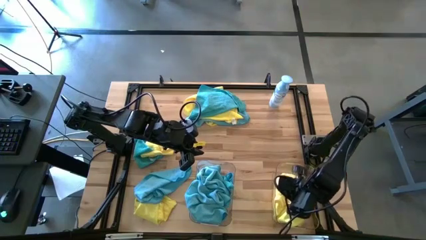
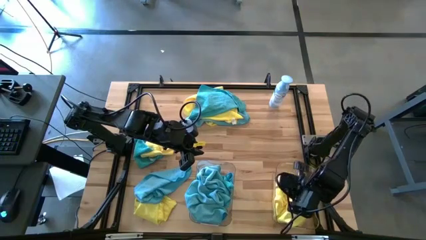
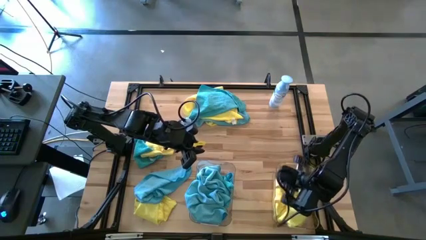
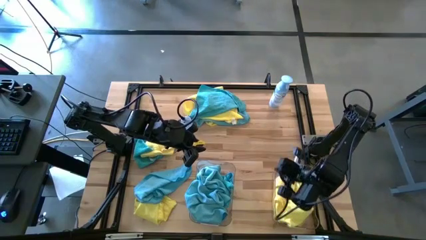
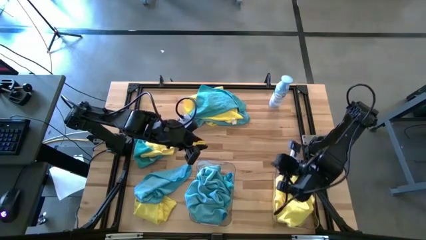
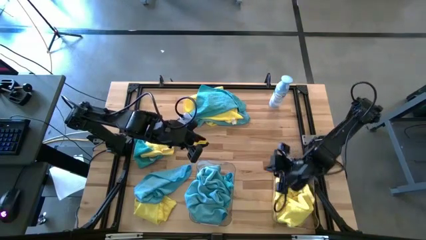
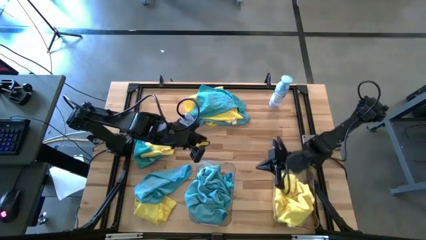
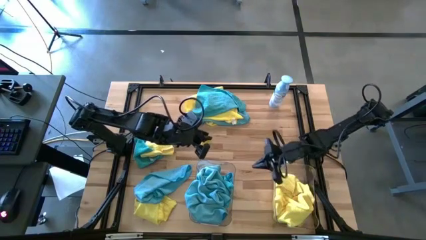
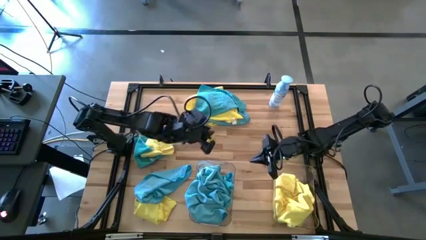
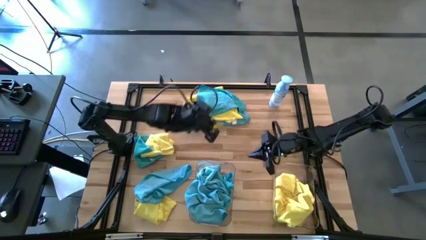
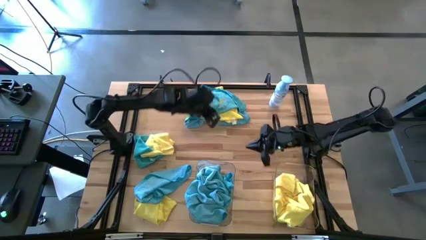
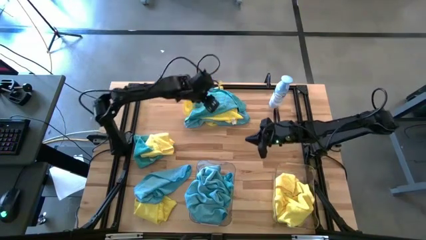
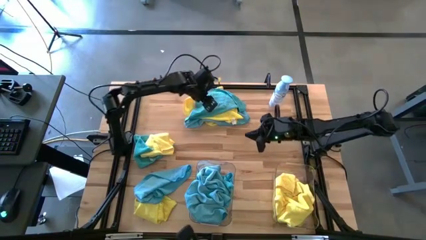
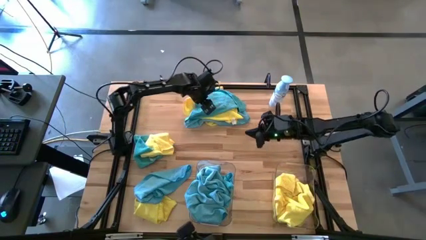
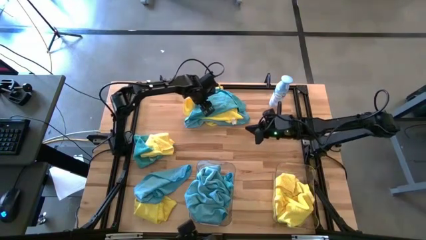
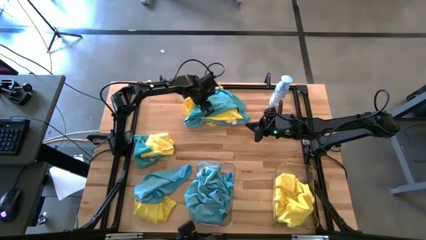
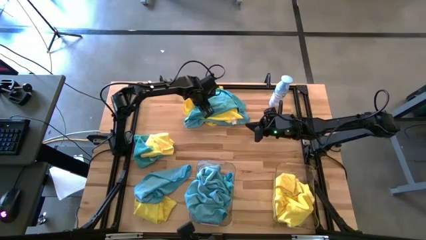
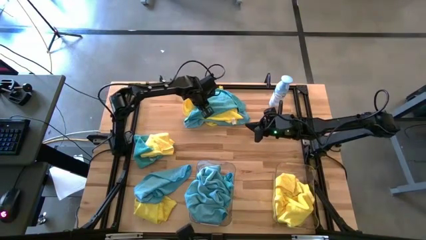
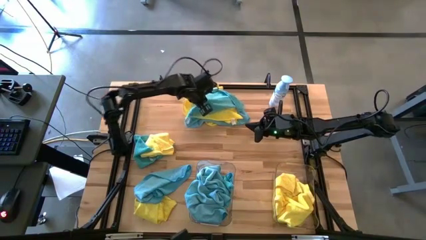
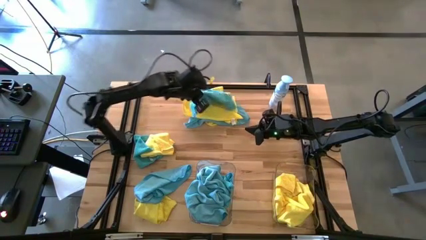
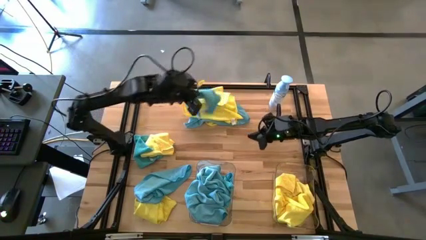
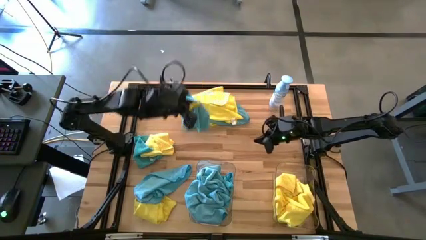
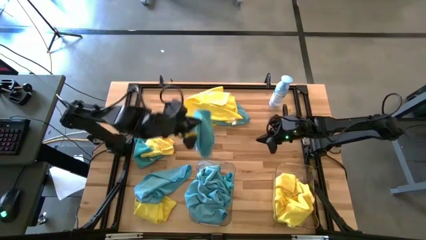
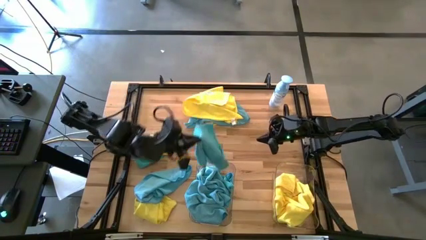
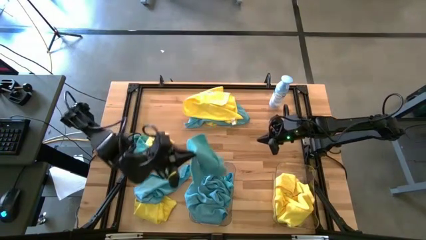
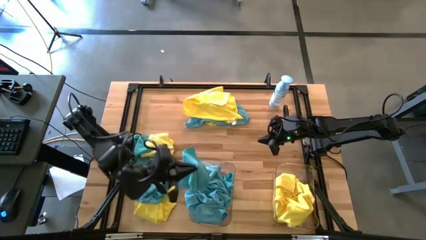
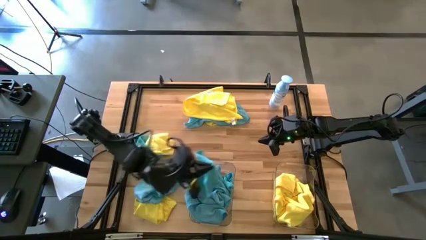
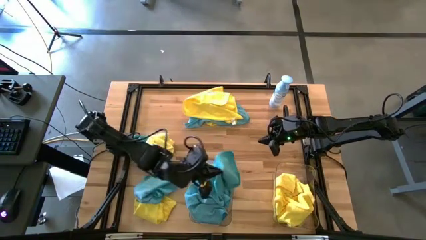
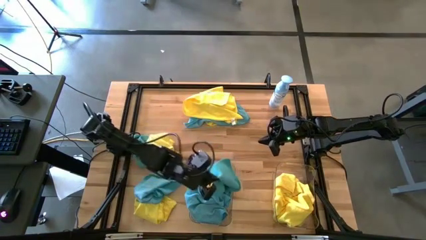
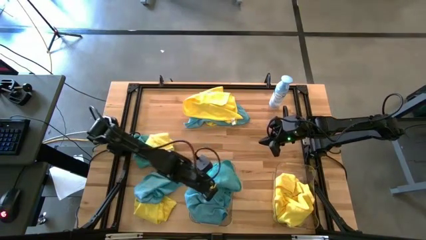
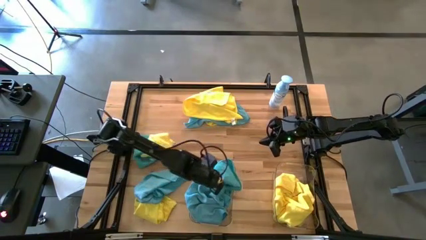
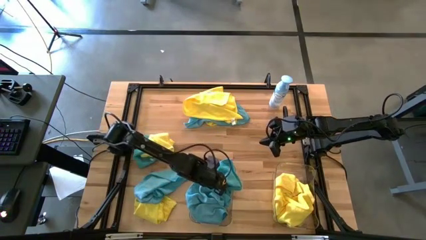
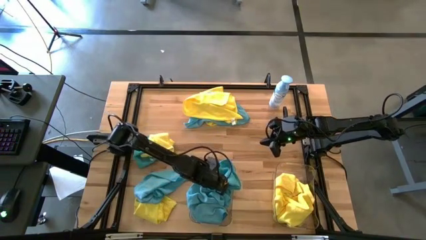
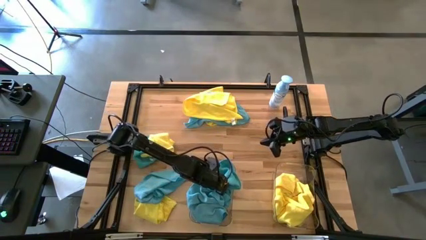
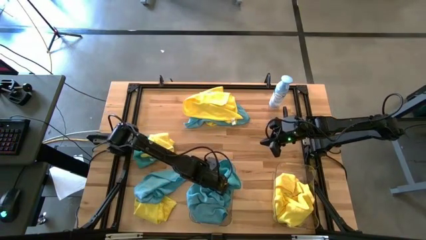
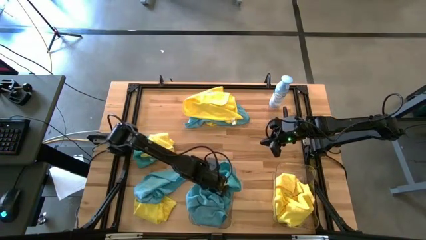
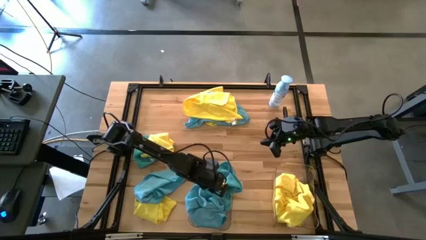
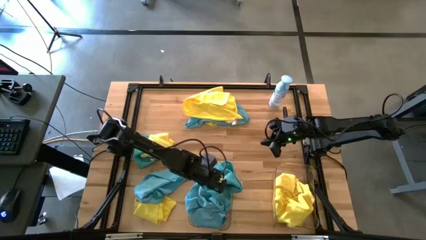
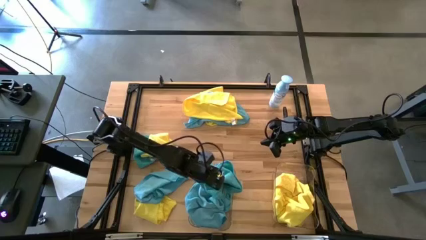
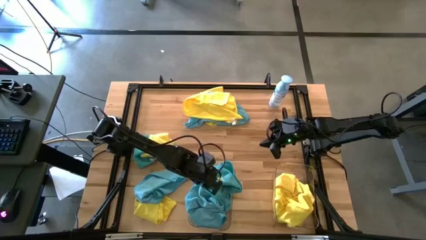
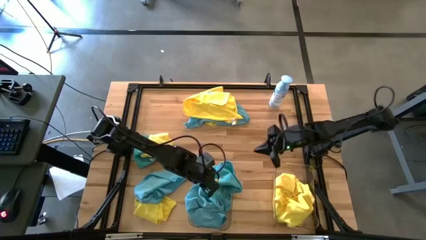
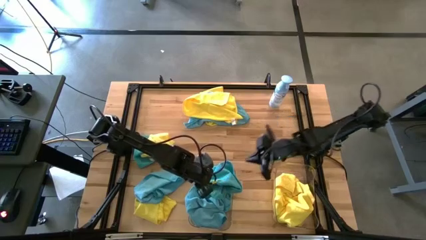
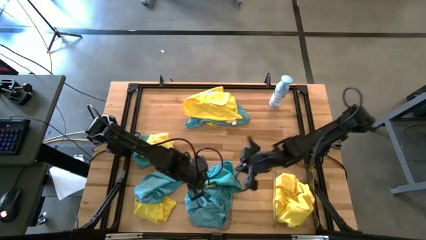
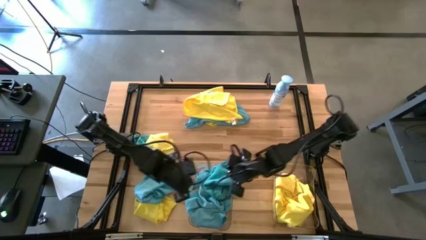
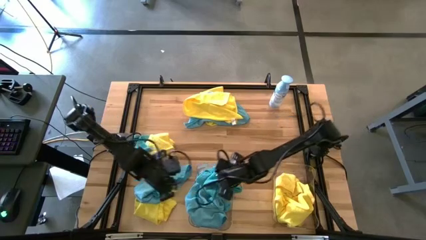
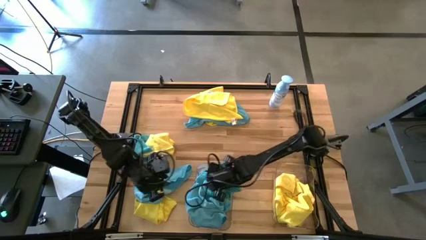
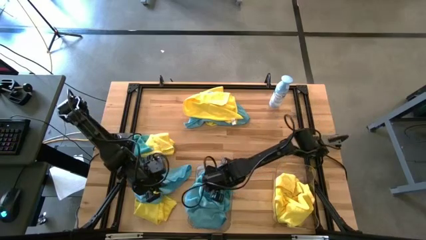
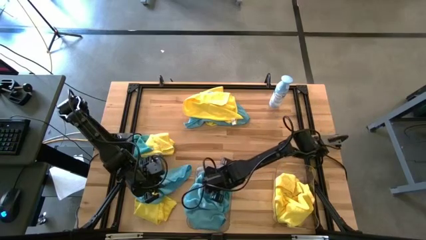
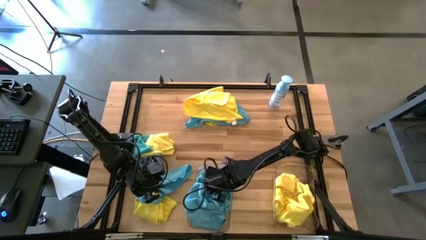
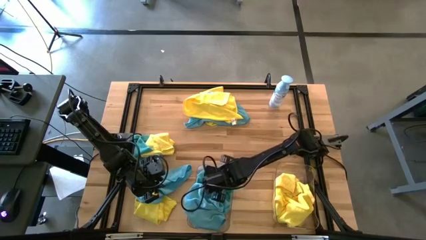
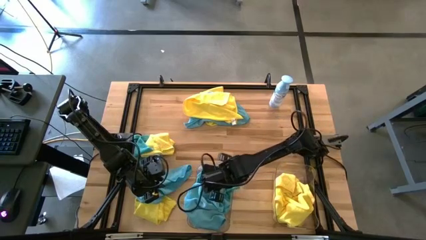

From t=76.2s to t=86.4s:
Task: Sort microfiber towel by color & place in baskets
Put the blue towel into the right transparent bin

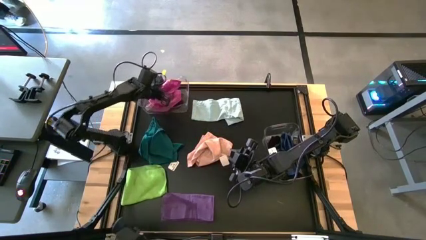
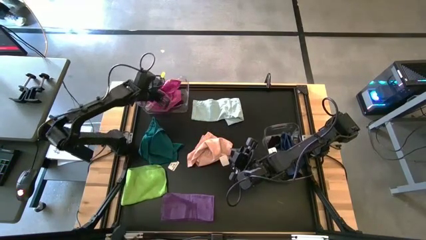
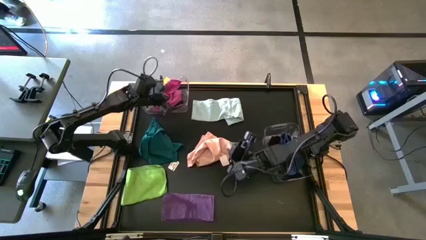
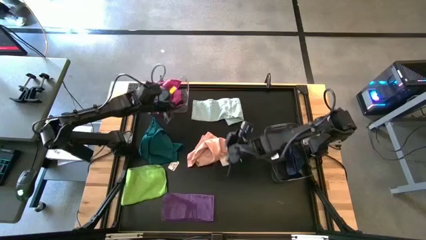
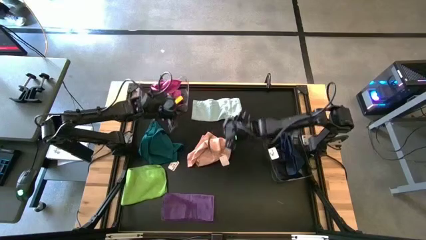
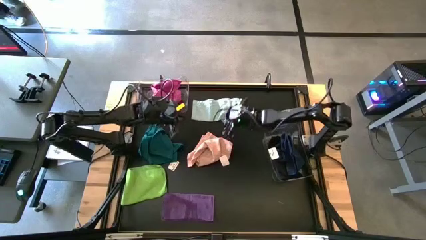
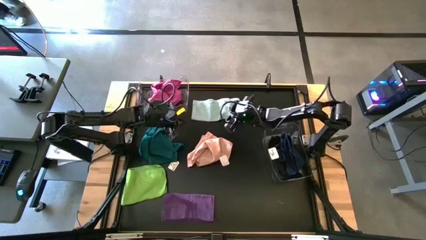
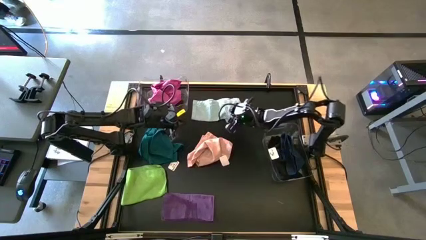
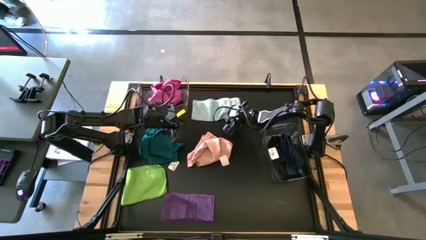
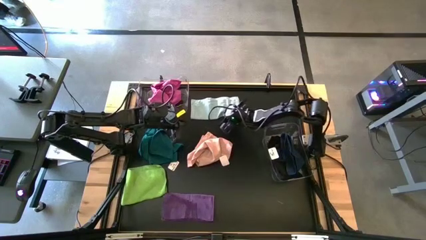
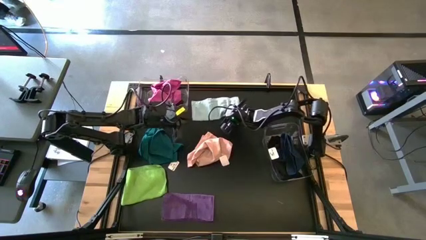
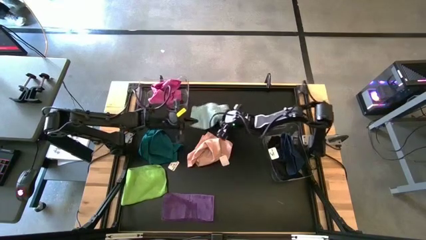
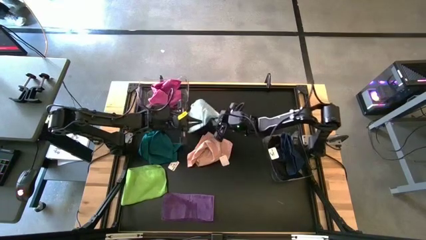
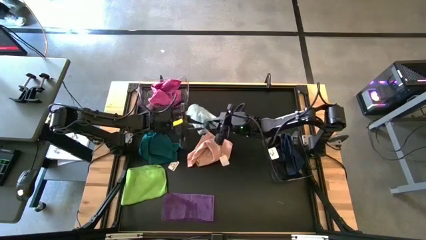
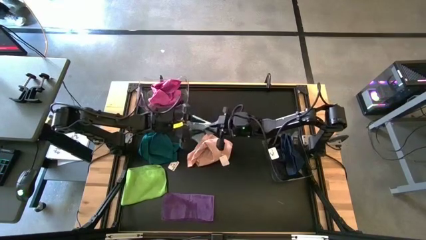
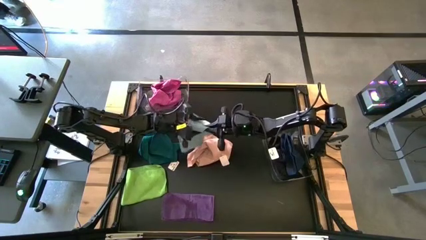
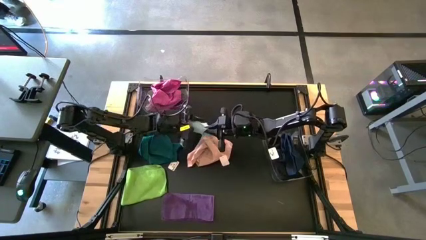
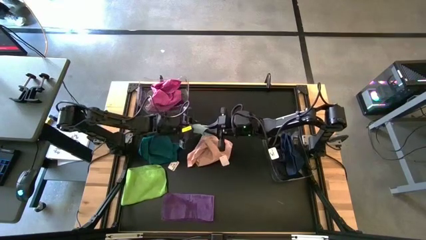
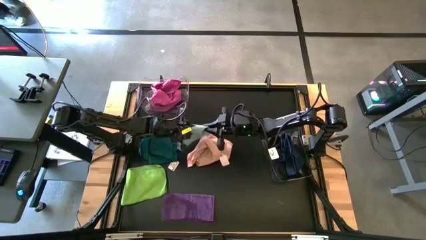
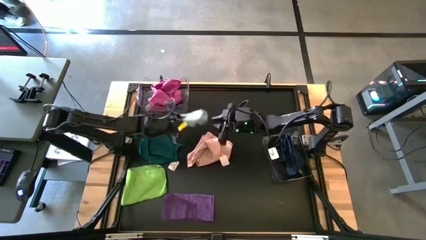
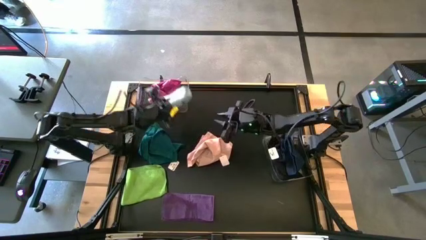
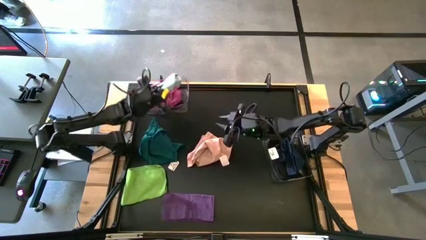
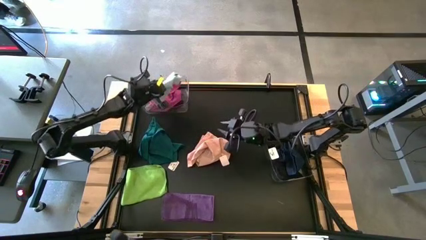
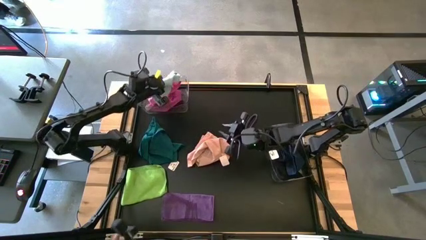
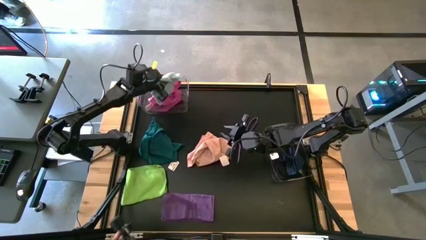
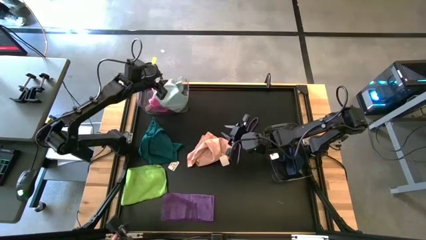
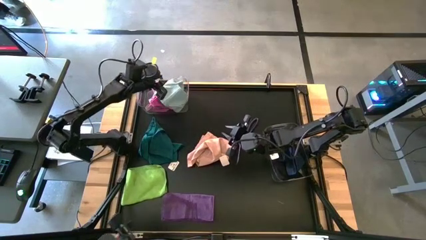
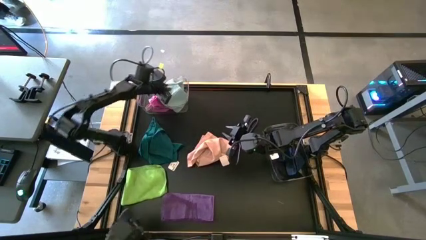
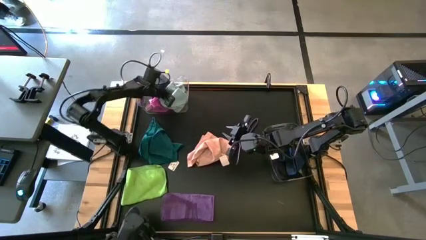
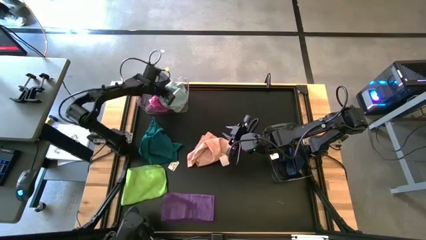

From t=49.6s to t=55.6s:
Task: Sort towels by color in basket
Put the gray towel into the top transparent bin
